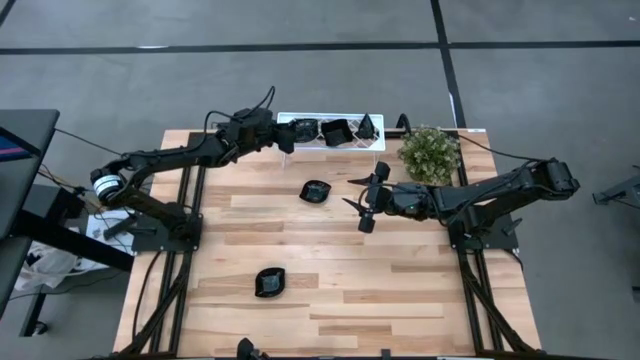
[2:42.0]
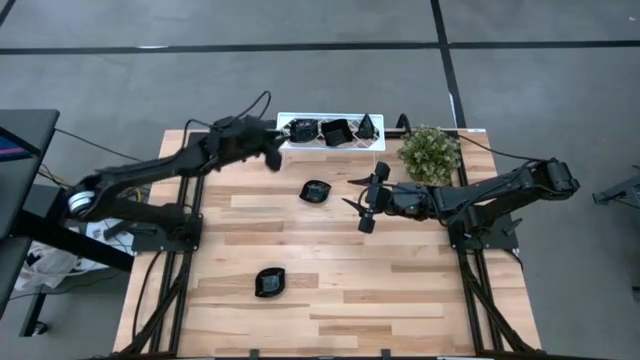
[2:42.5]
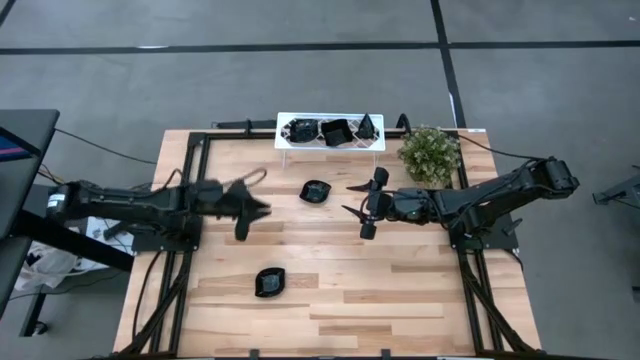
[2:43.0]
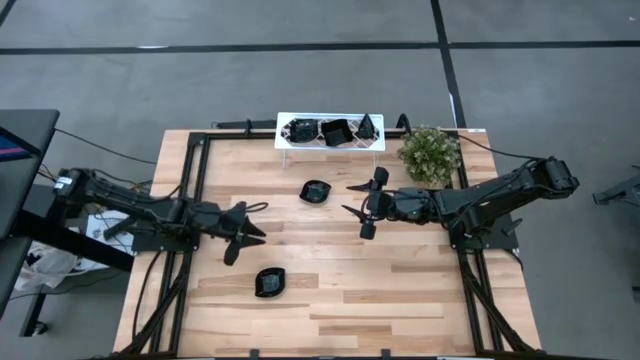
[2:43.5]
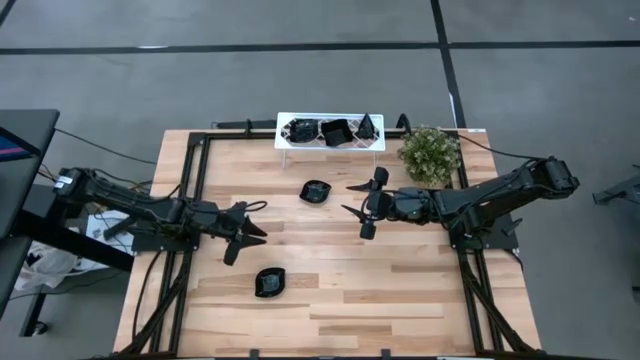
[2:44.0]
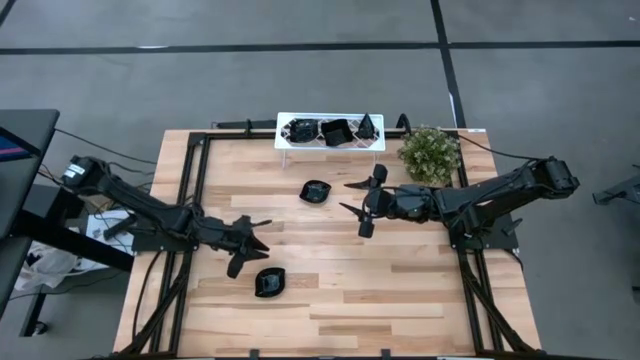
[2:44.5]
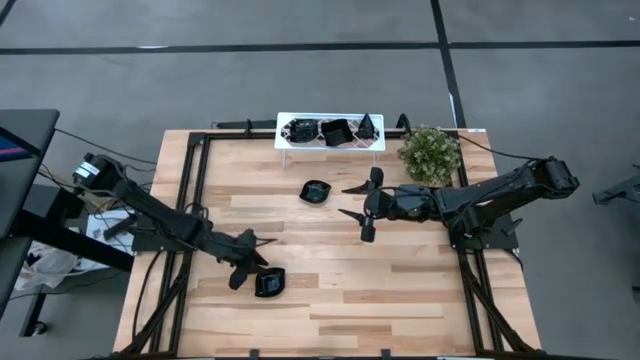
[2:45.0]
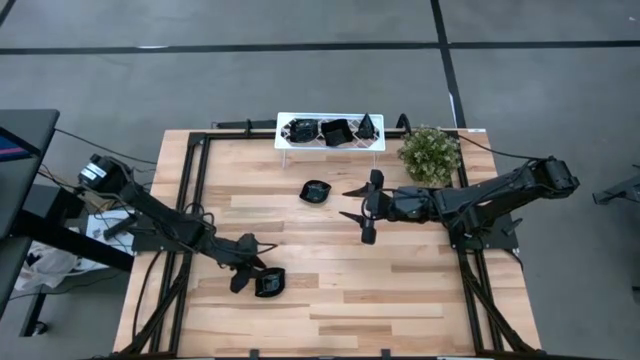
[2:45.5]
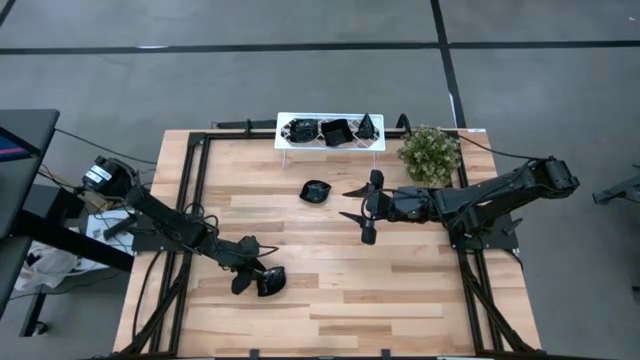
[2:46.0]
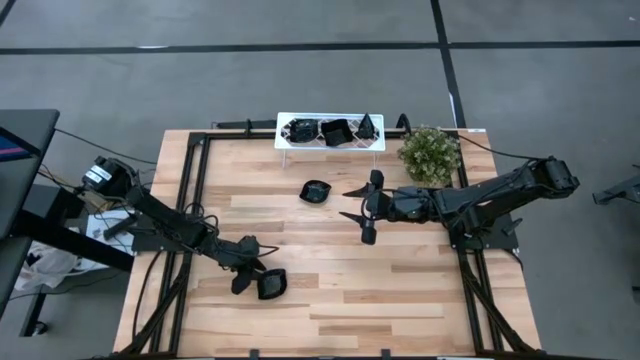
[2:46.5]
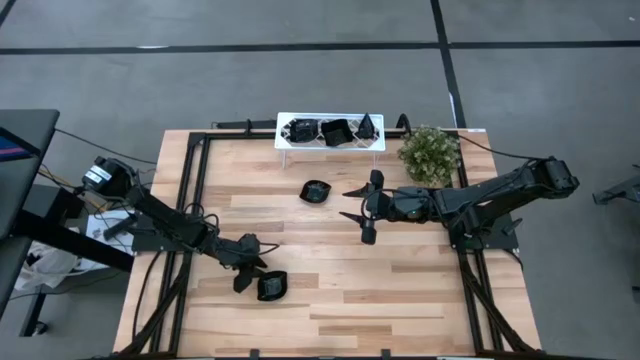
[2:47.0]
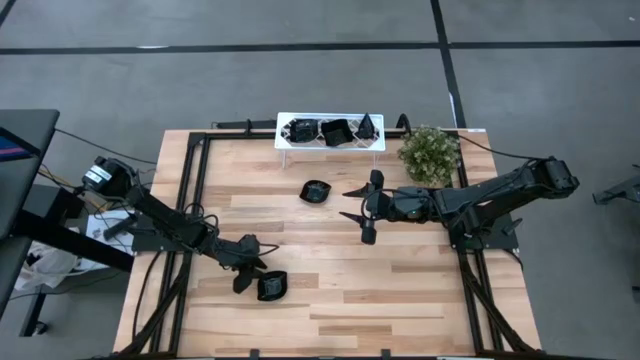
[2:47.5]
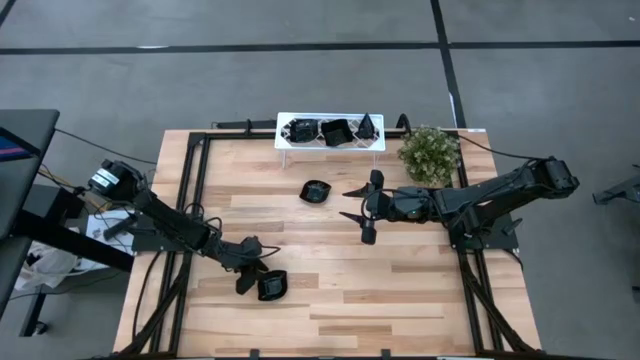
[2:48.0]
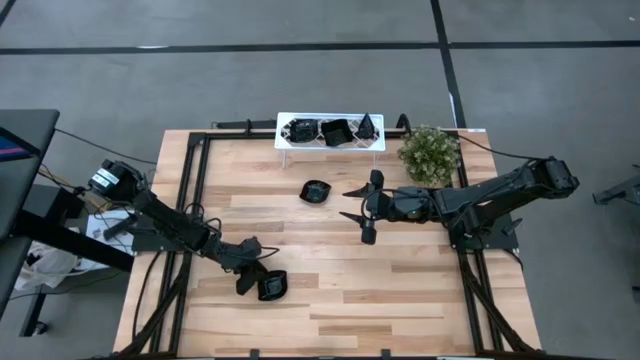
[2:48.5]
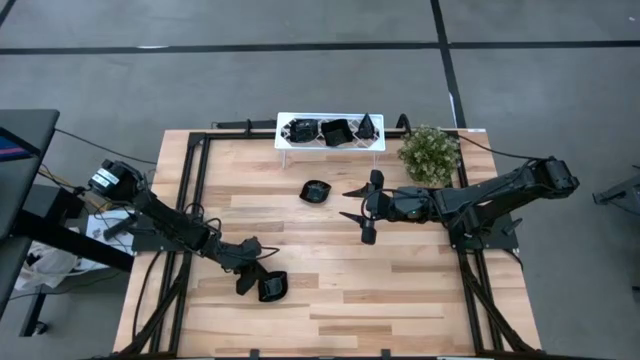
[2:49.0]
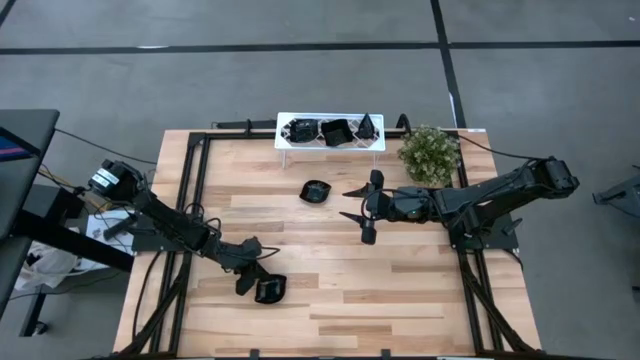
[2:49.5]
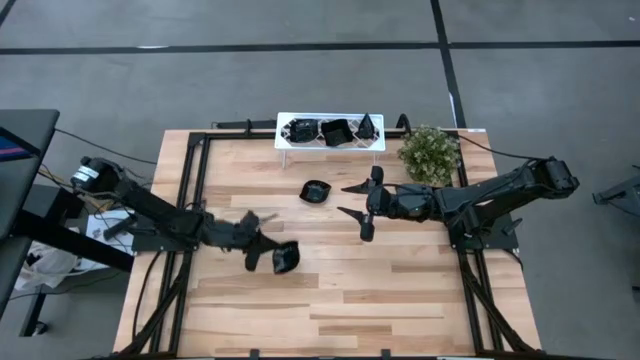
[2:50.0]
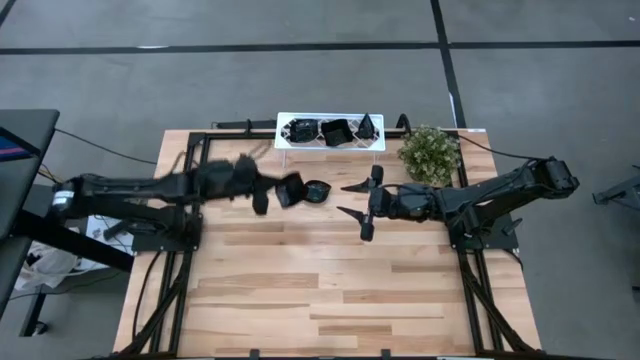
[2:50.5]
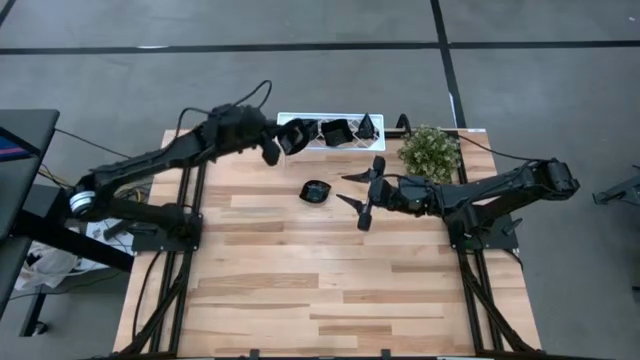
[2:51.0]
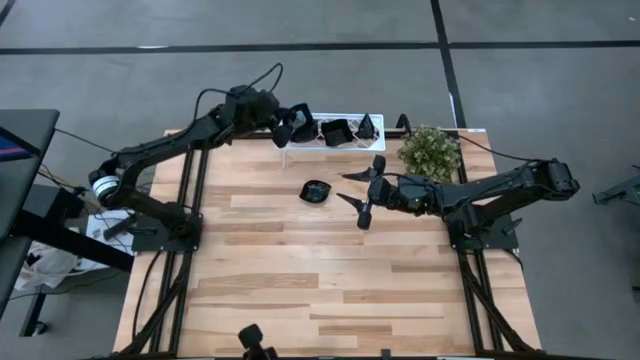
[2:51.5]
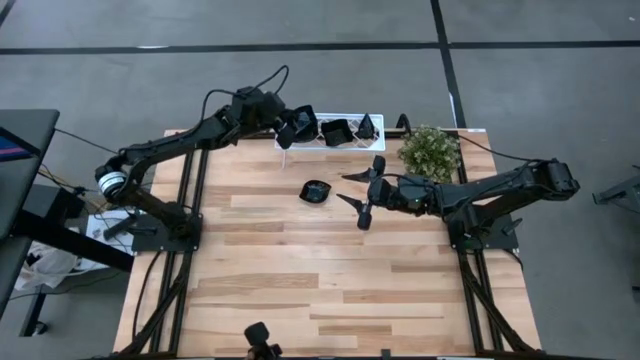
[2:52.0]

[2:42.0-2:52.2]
Task: Pick & Place Mini shaped plates
Stack the bottom leaf-shaped plate on top of the leaf-shaped plates on the shelf

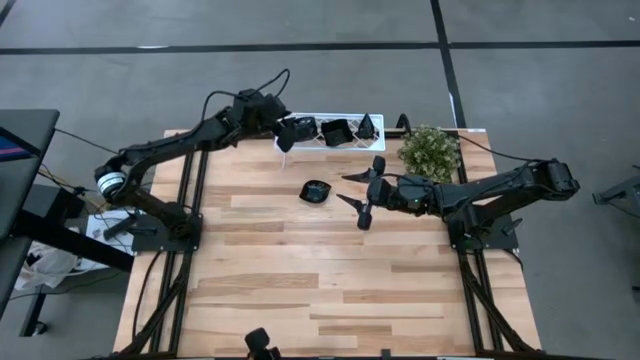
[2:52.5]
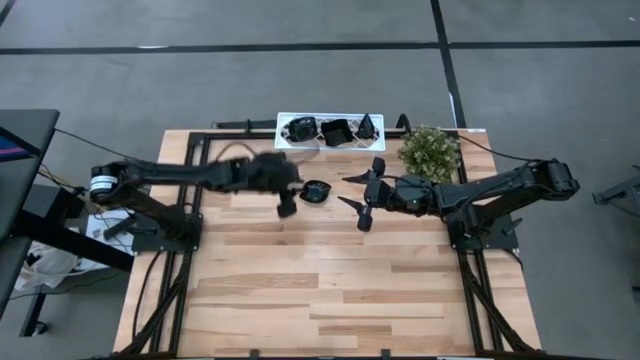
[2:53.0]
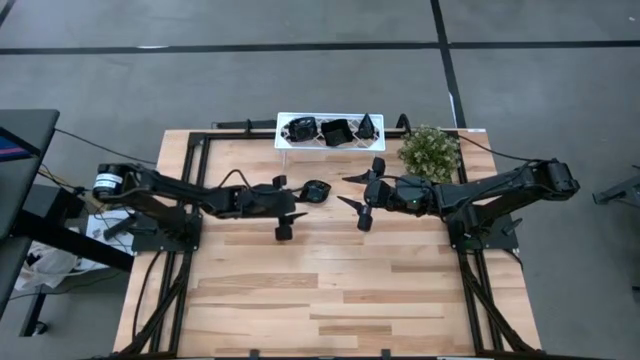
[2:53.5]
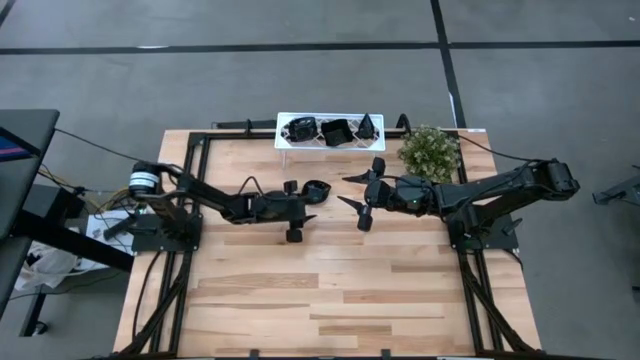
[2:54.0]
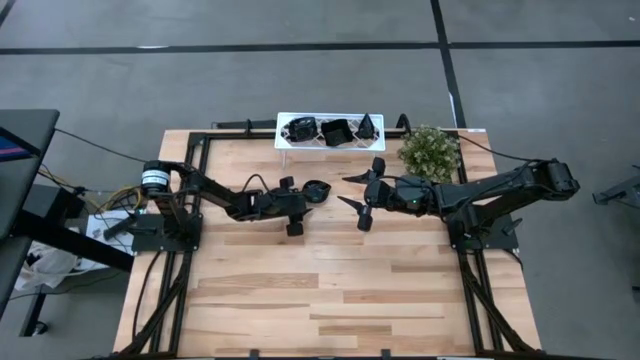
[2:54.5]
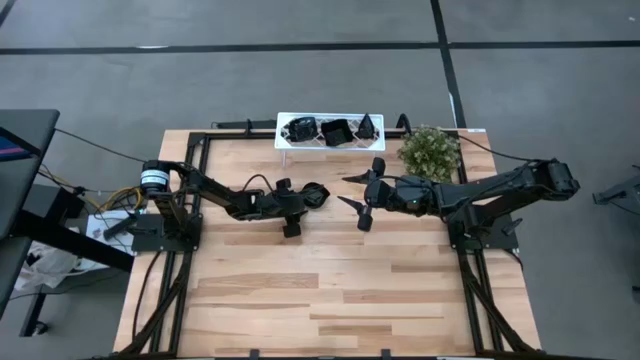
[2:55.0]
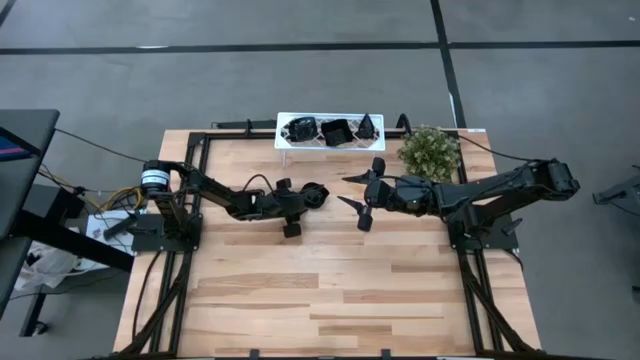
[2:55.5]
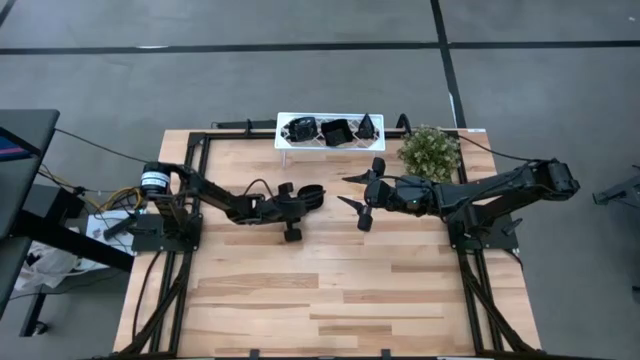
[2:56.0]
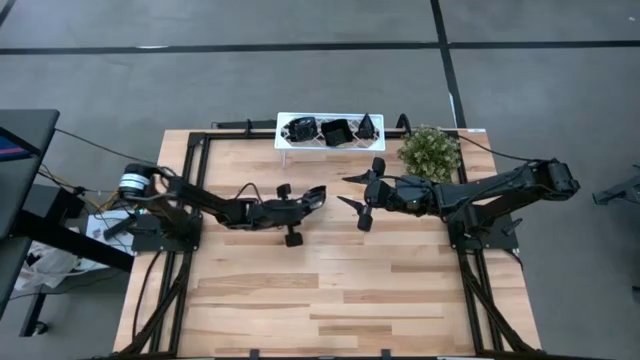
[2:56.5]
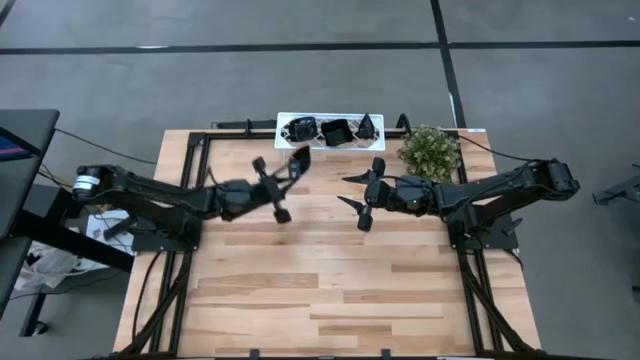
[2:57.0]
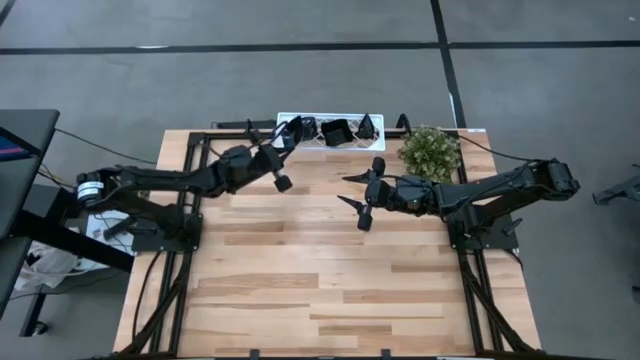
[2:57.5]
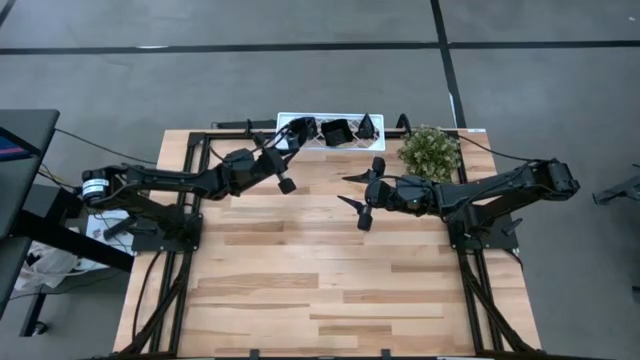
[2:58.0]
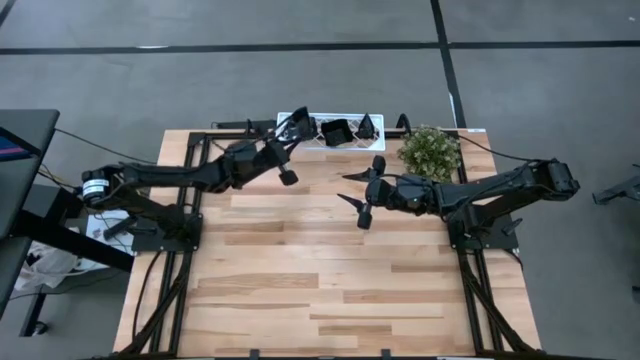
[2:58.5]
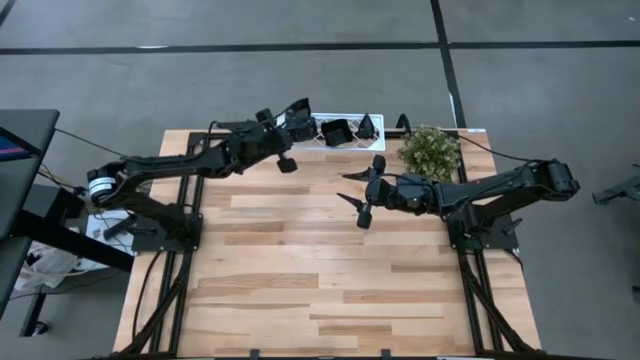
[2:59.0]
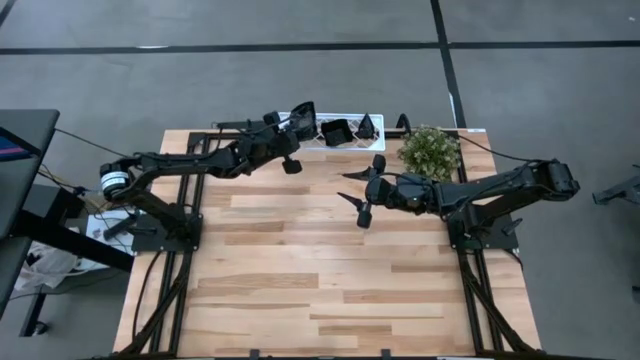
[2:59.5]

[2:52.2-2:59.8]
Stack the leaf-shaped plate on top of the leaf-shaped plates on the shelf

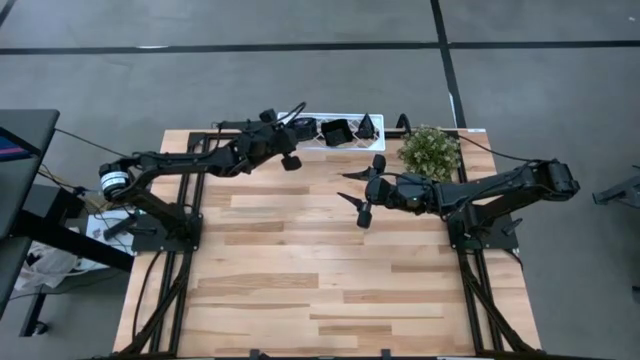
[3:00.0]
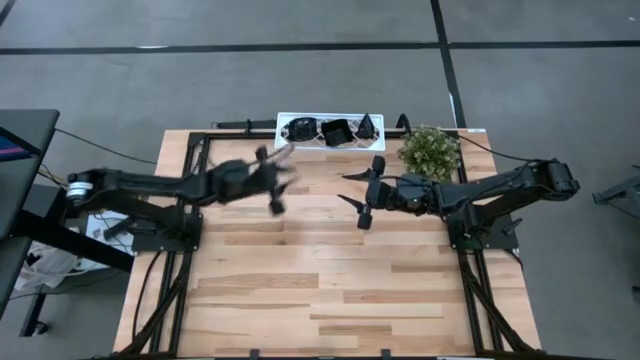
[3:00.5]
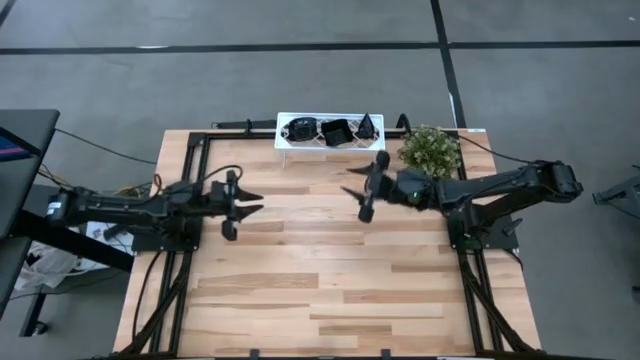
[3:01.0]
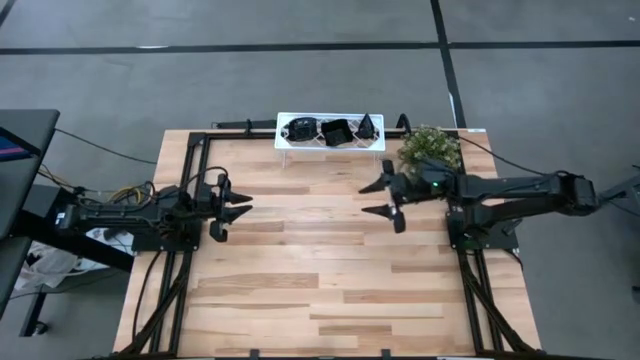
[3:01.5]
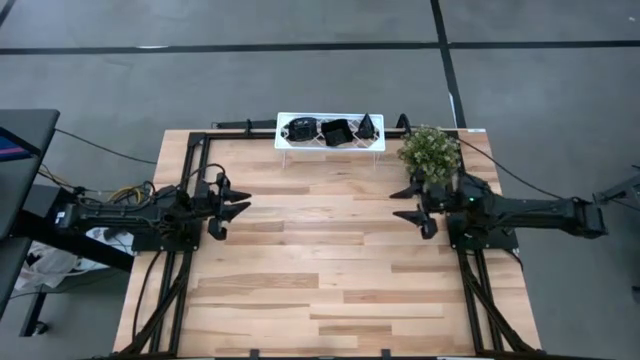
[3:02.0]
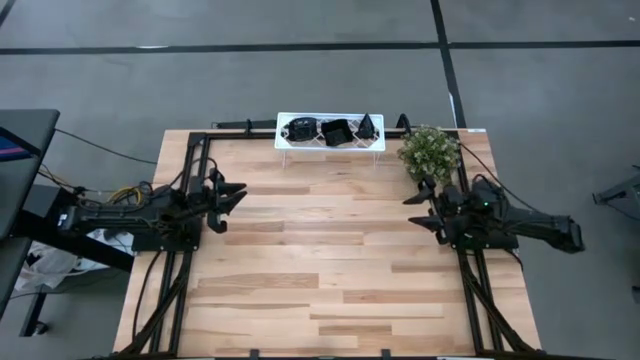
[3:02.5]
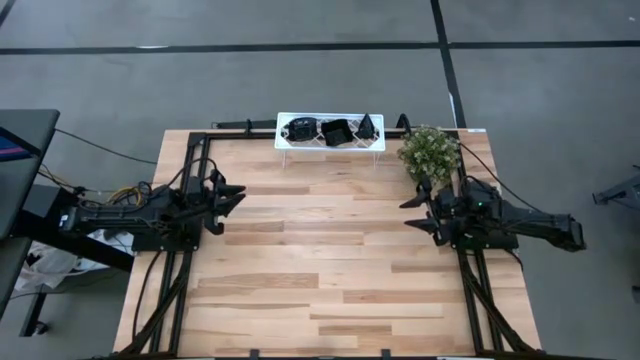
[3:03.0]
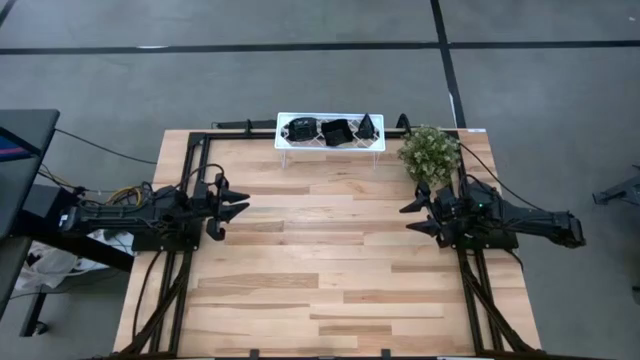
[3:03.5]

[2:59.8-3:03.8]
Return to Home Position
